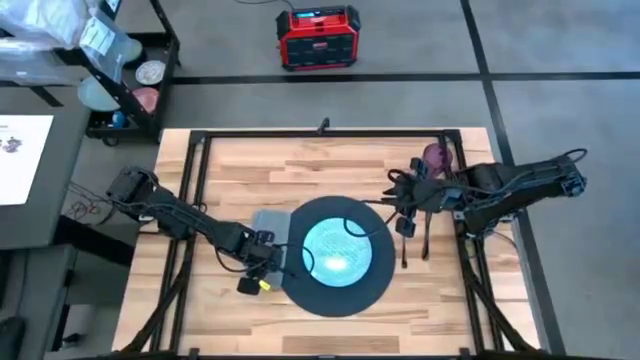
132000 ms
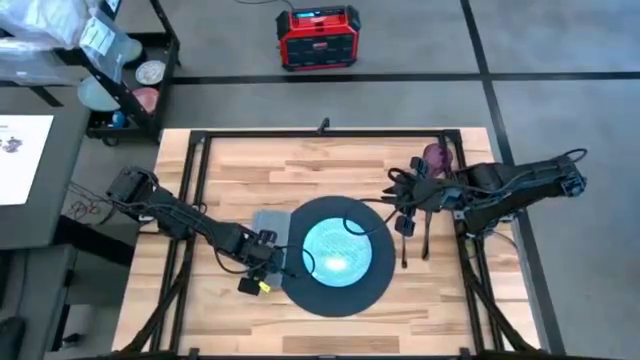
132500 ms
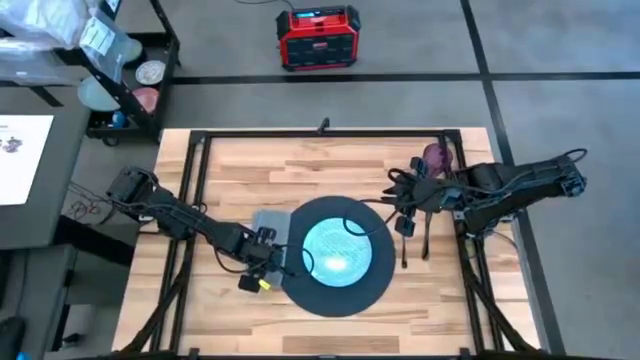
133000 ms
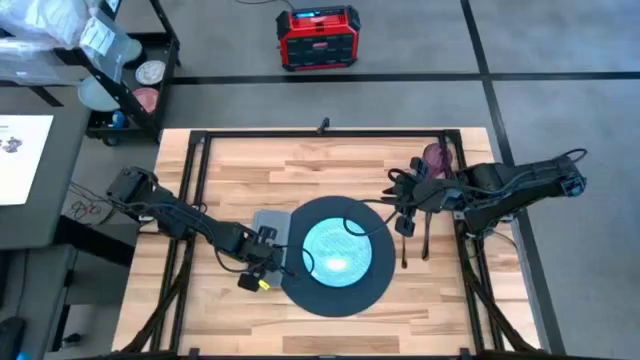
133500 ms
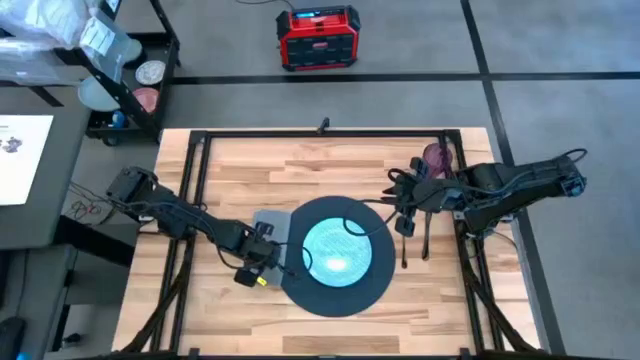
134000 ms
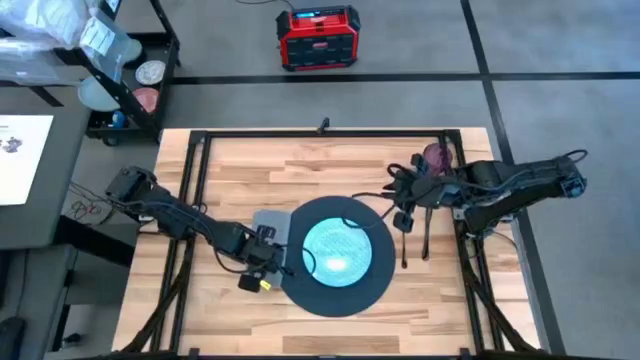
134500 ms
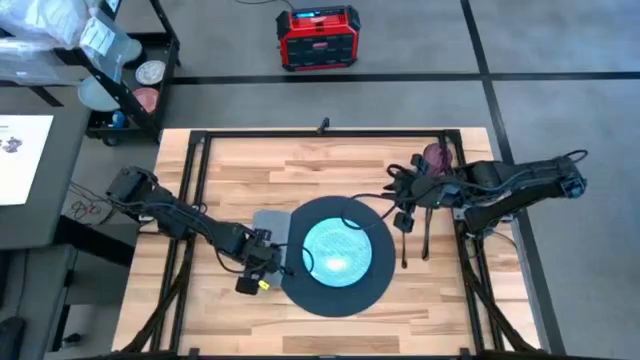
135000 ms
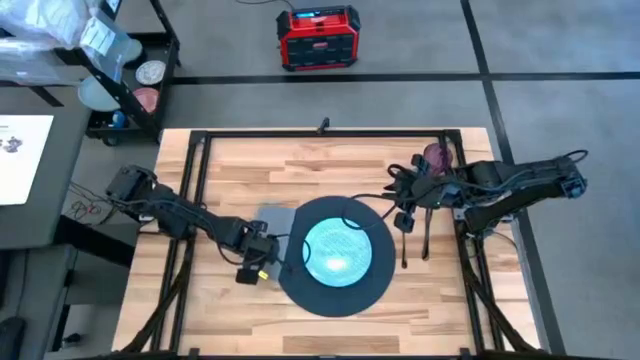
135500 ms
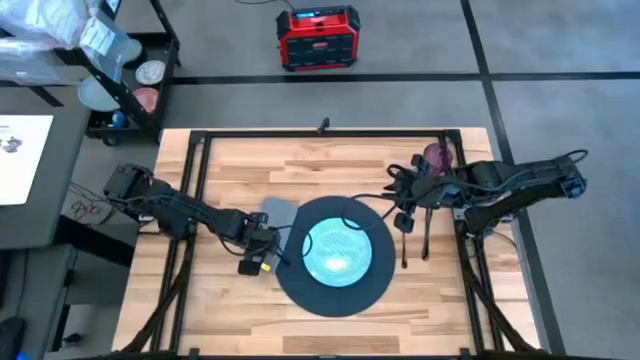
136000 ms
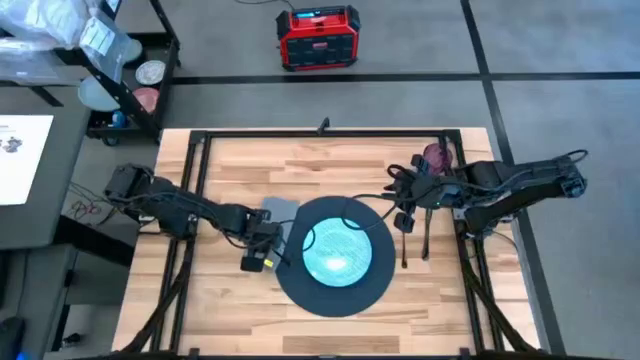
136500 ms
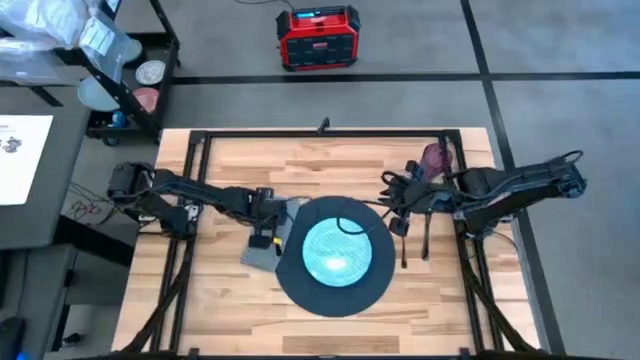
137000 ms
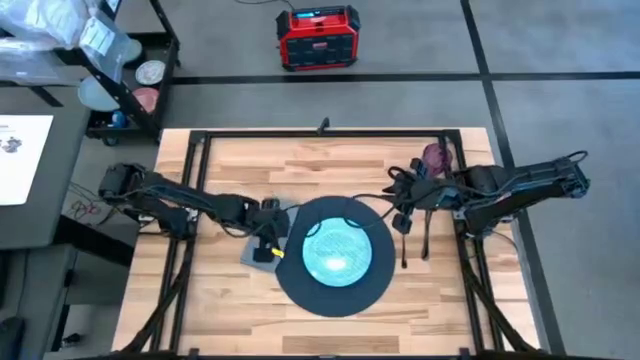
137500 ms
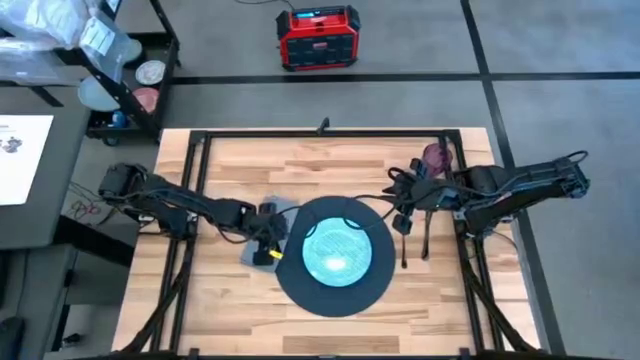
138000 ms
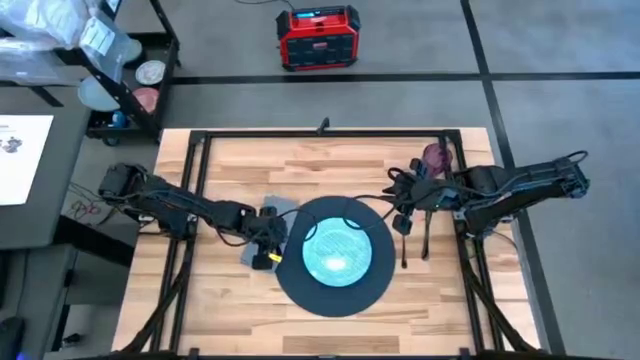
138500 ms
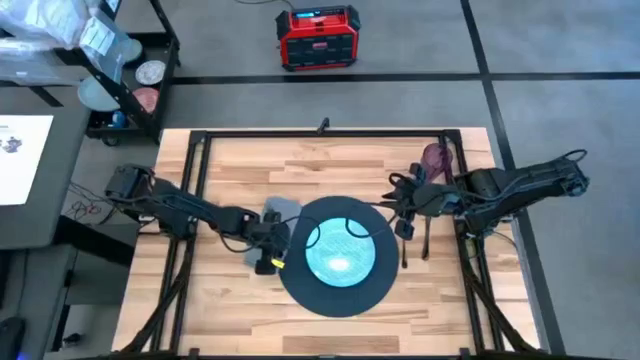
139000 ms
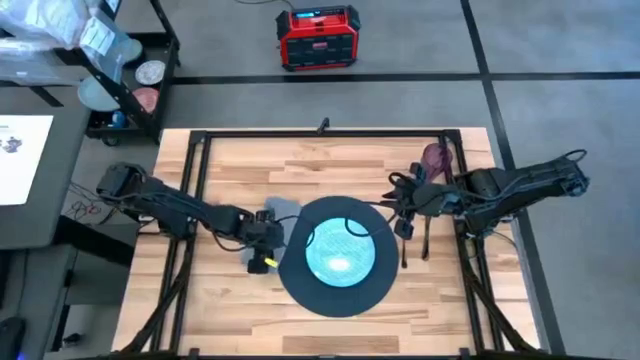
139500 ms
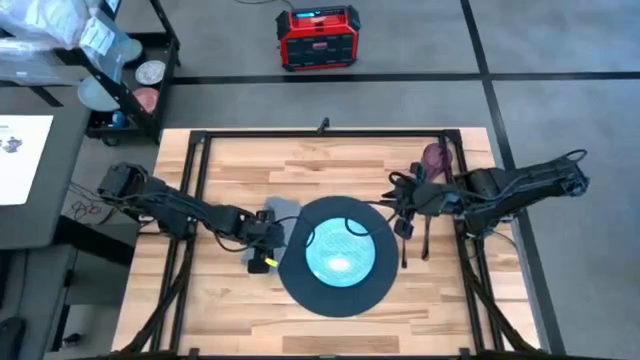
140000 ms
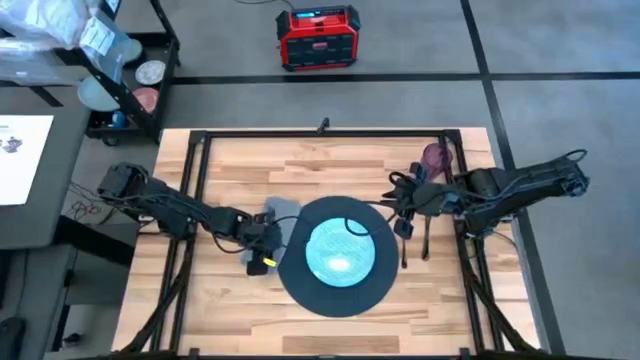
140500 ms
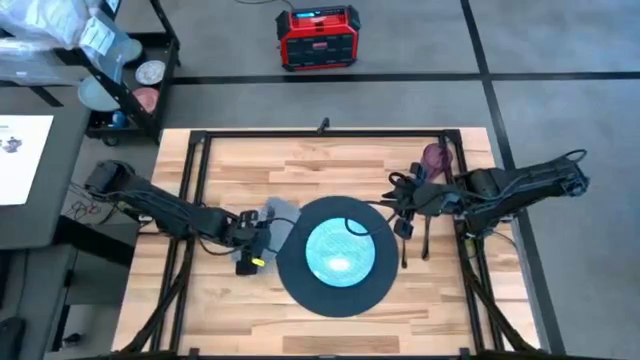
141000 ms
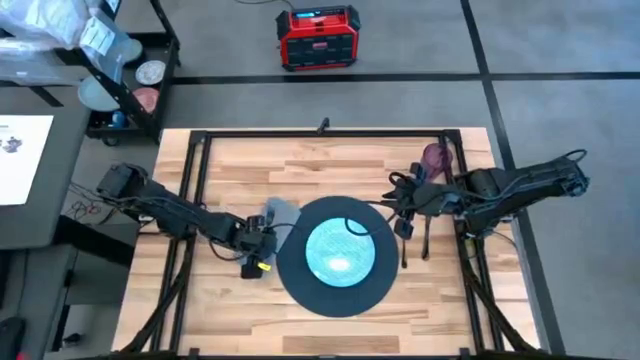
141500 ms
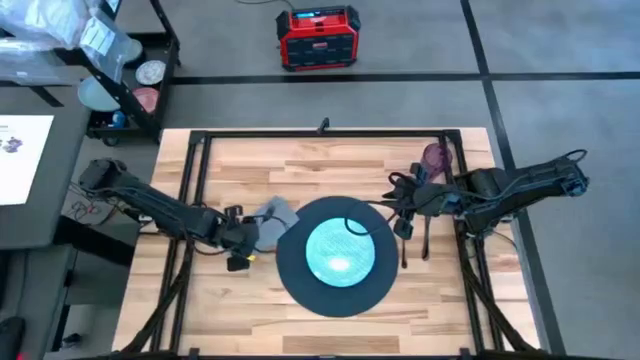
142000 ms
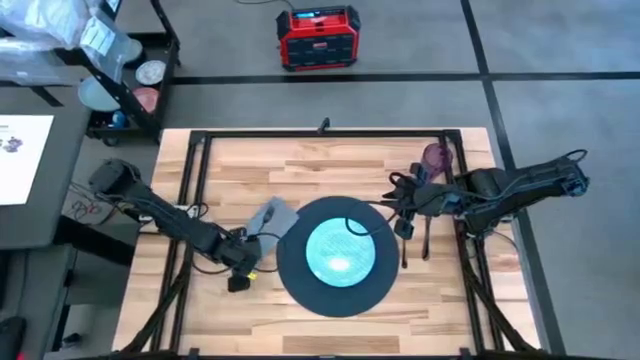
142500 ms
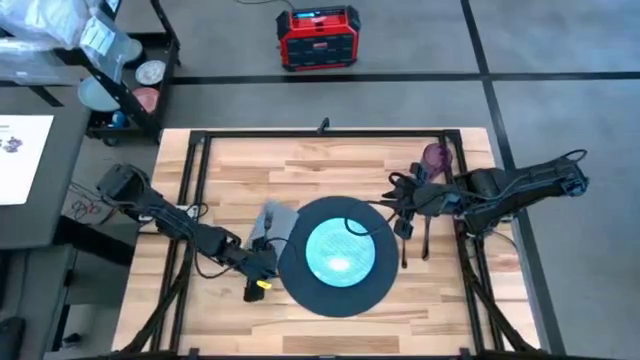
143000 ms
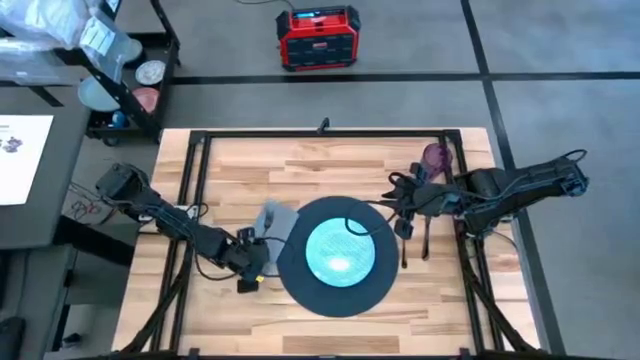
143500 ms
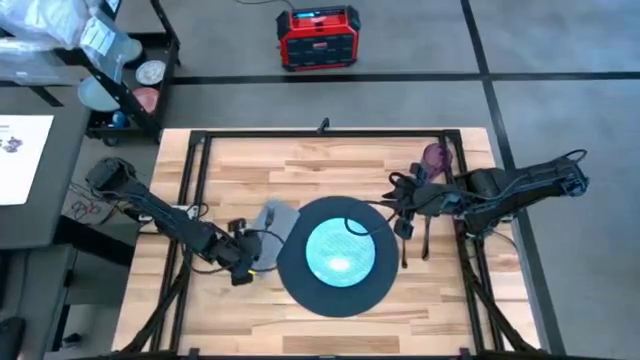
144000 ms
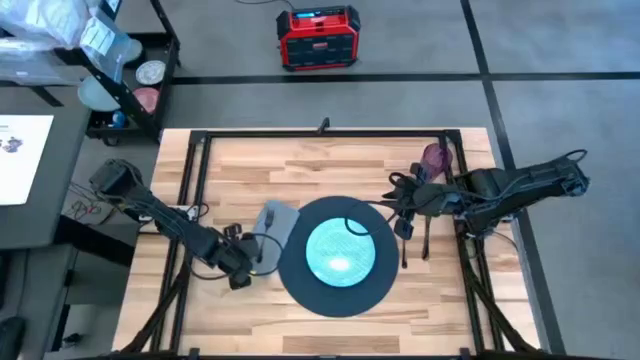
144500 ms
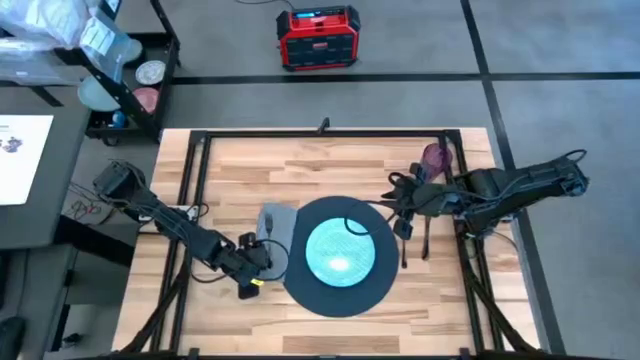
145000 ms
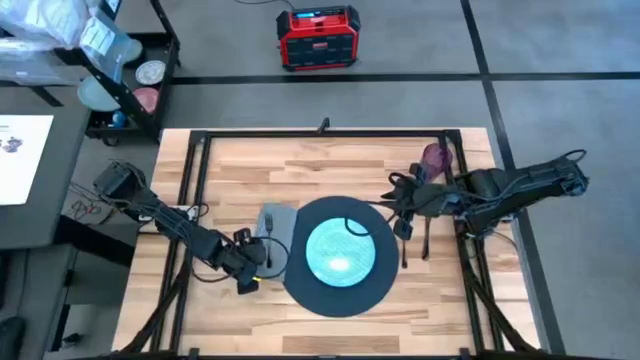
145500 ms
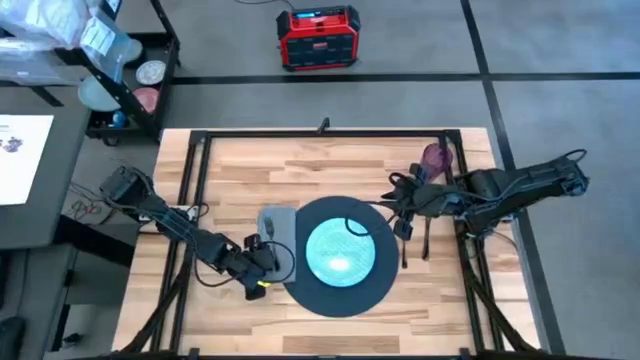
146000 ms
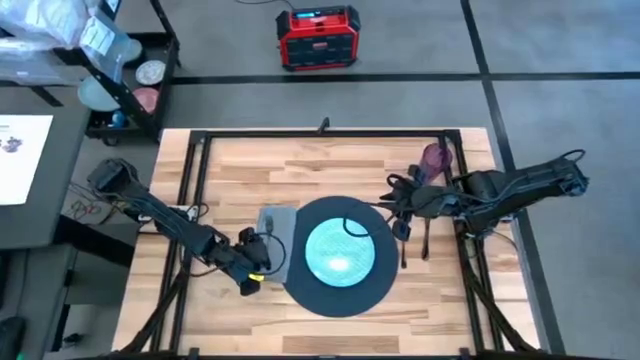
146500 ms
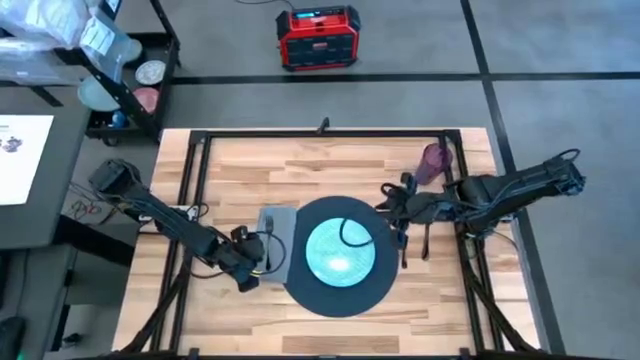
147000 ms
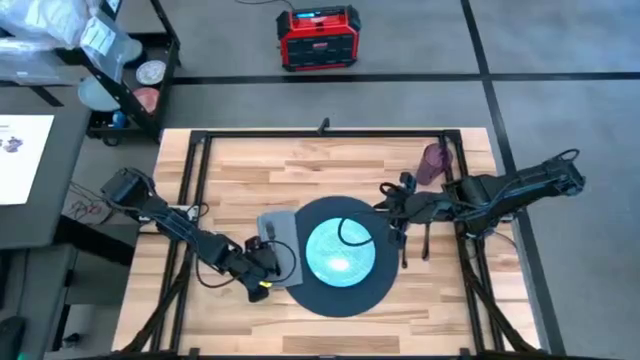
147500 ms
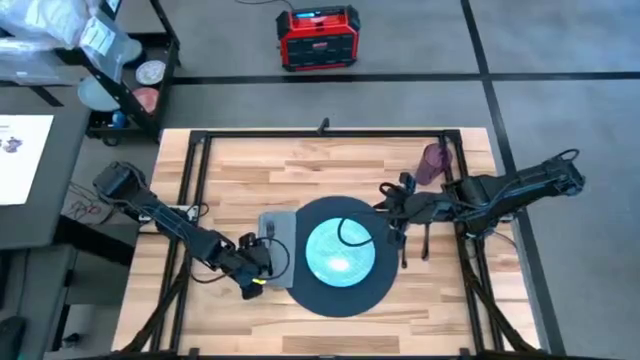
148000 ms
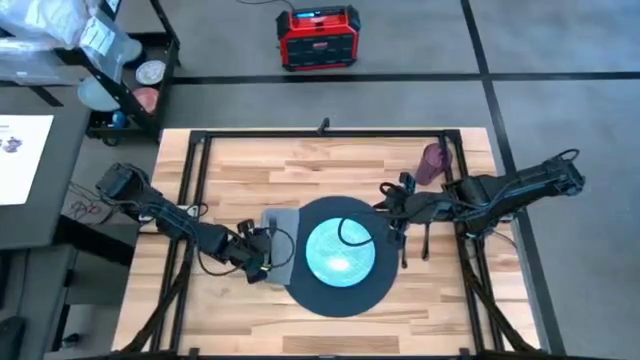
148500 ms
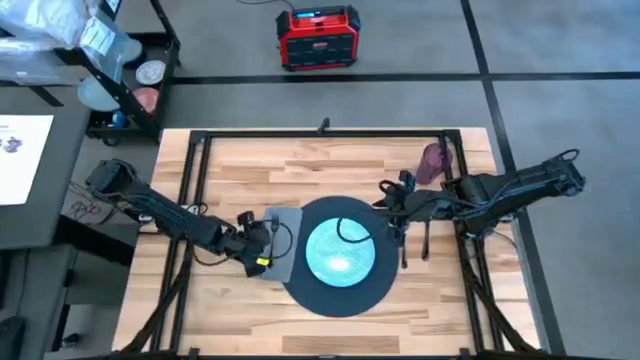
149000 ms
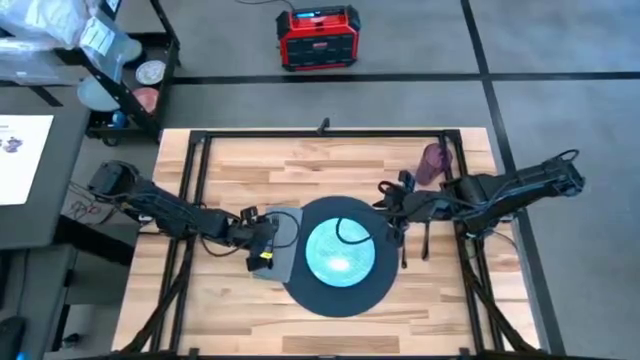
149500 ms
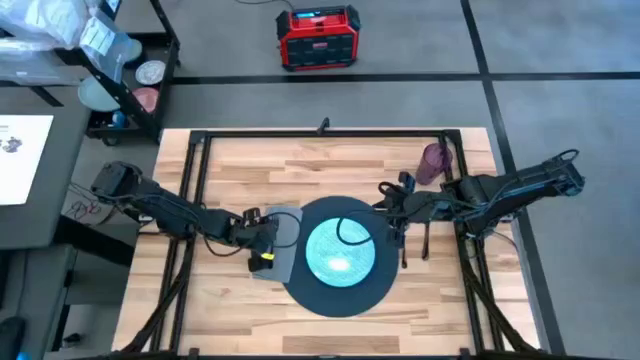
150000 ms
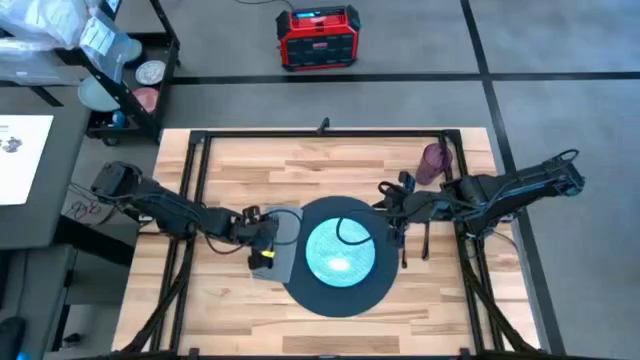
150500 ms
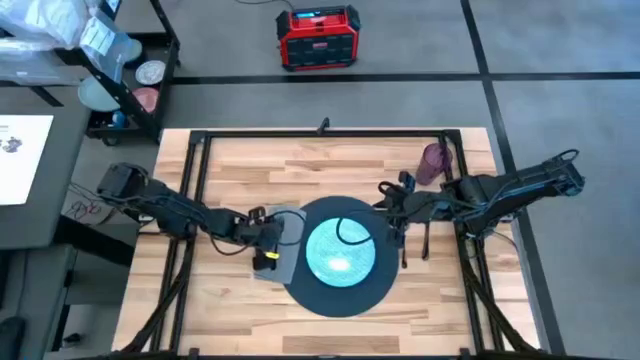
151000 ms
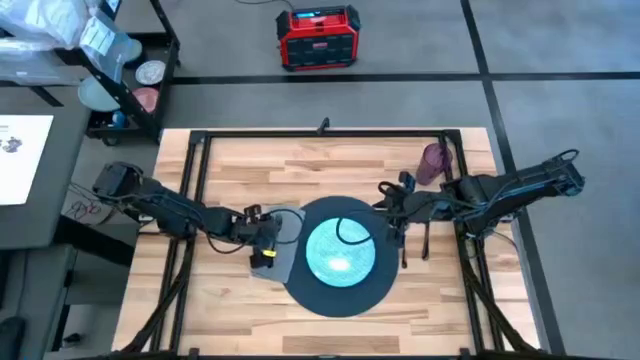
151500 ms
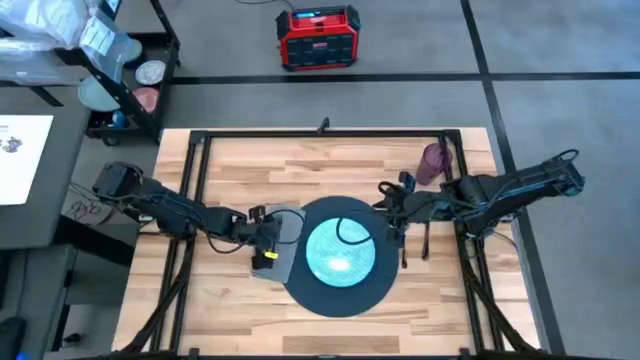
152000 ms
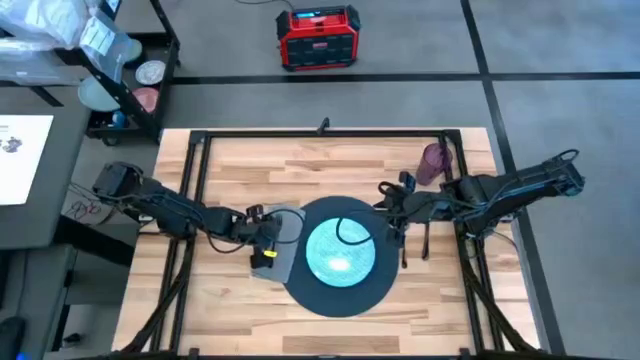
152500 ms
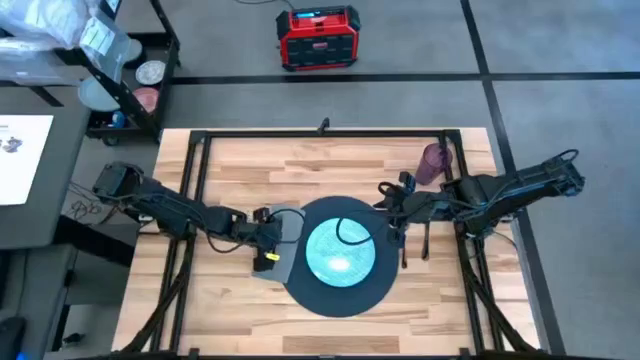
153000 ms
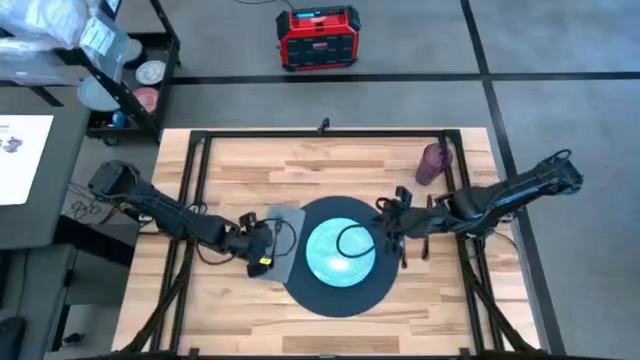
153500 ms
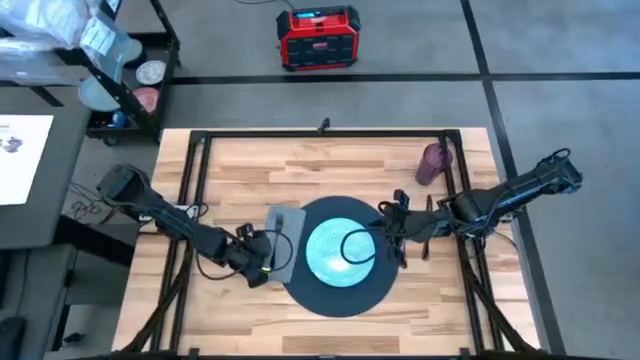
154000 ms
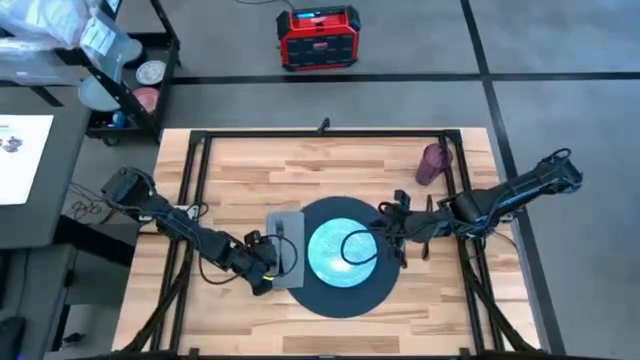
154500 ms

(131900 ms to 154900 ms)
Task: Set table place
Adjust the black fork on the gray table napkin
